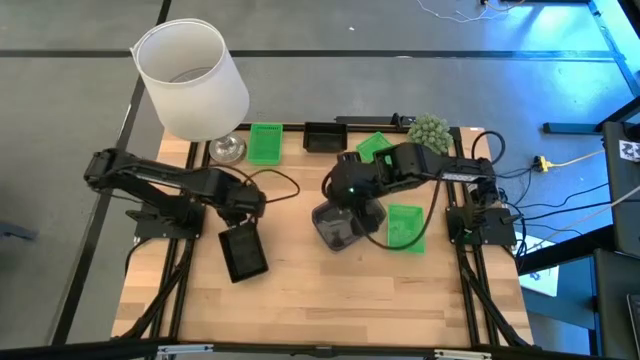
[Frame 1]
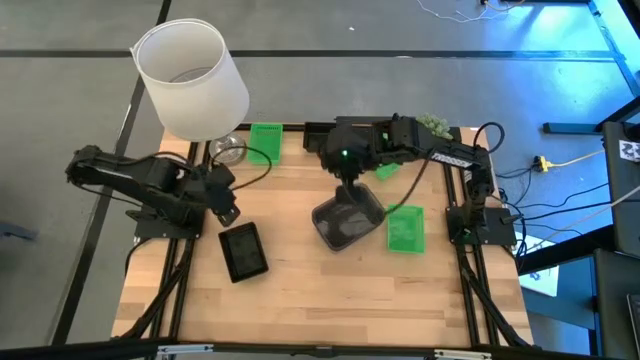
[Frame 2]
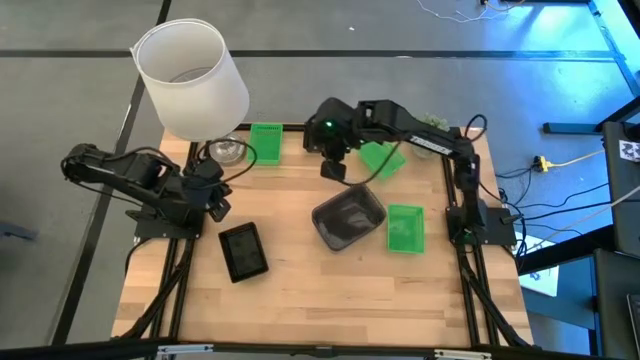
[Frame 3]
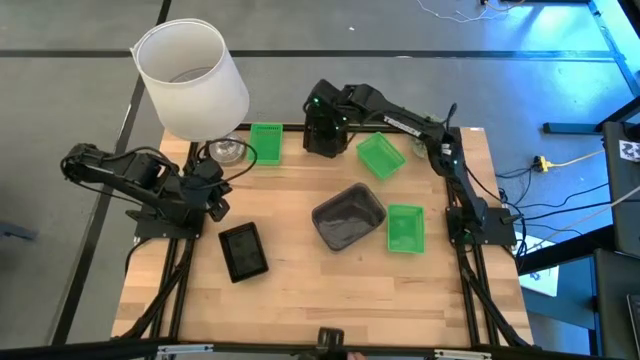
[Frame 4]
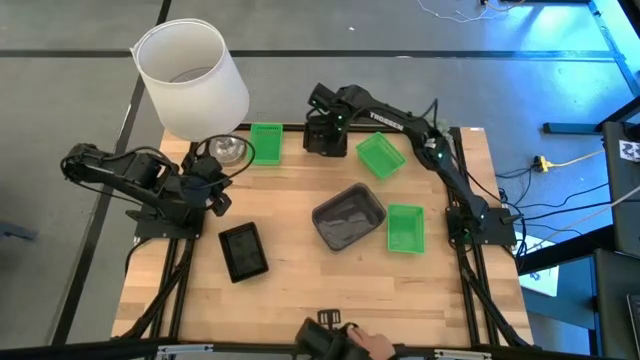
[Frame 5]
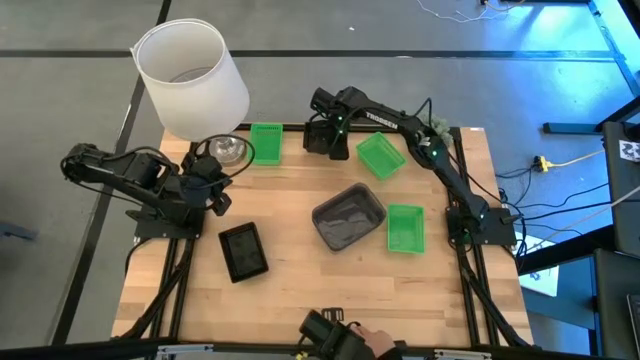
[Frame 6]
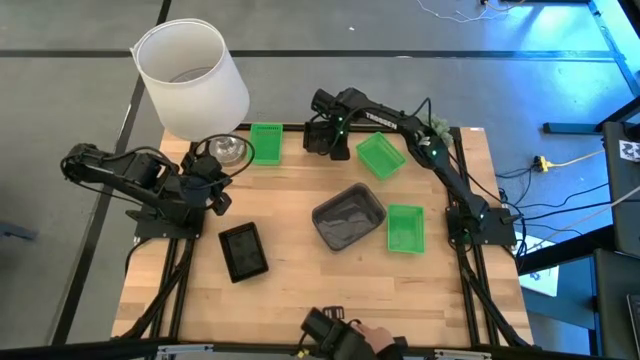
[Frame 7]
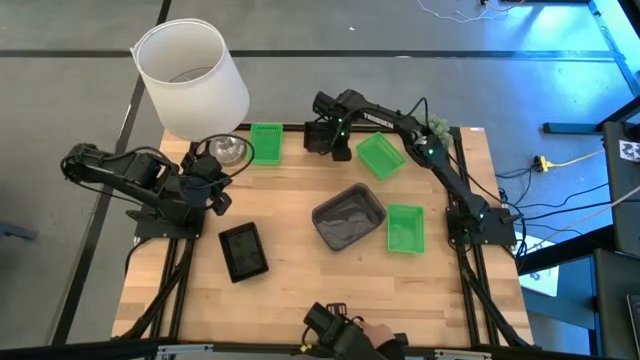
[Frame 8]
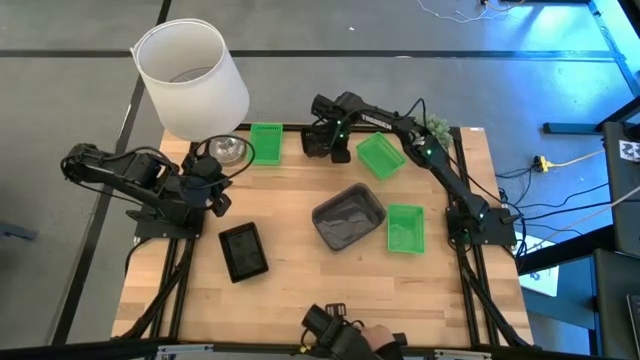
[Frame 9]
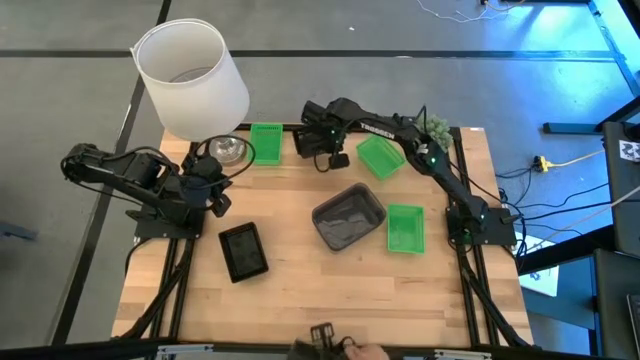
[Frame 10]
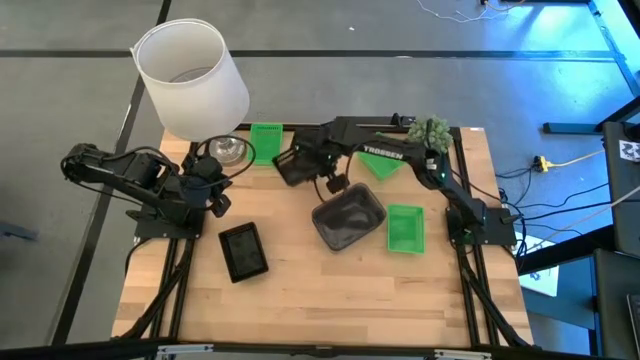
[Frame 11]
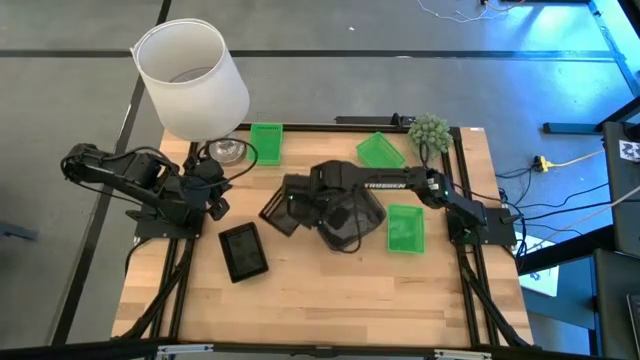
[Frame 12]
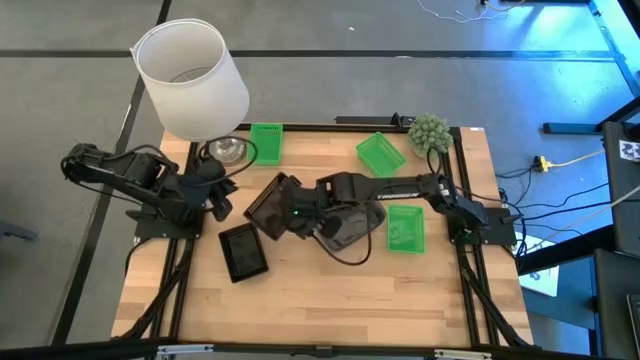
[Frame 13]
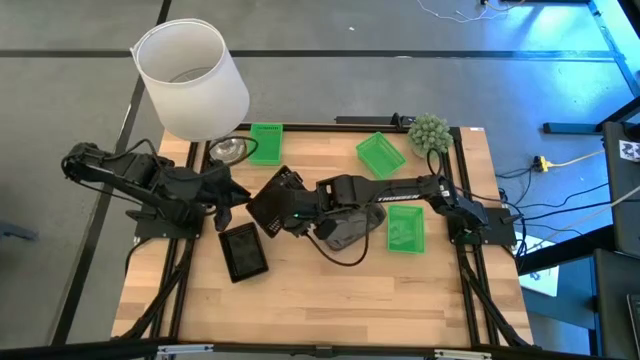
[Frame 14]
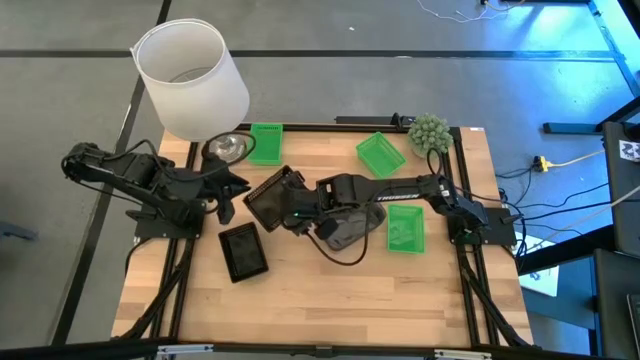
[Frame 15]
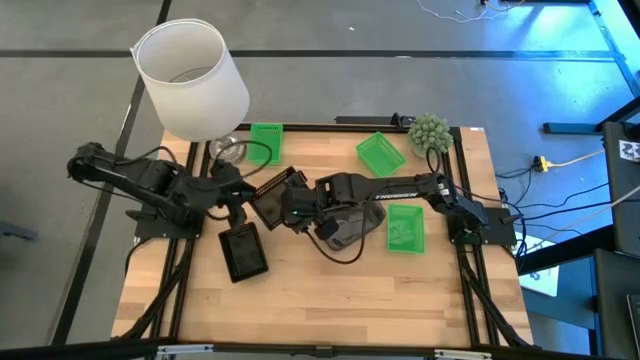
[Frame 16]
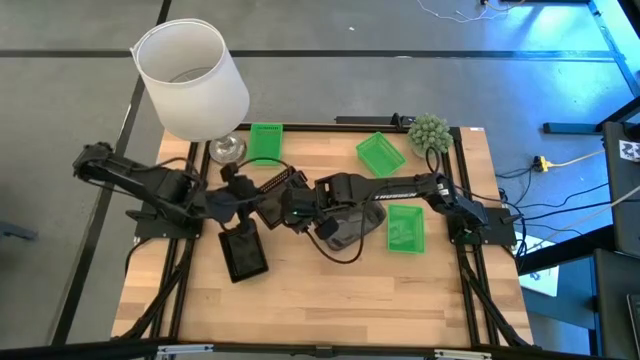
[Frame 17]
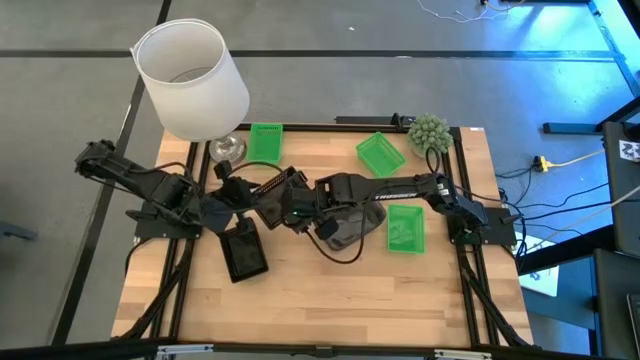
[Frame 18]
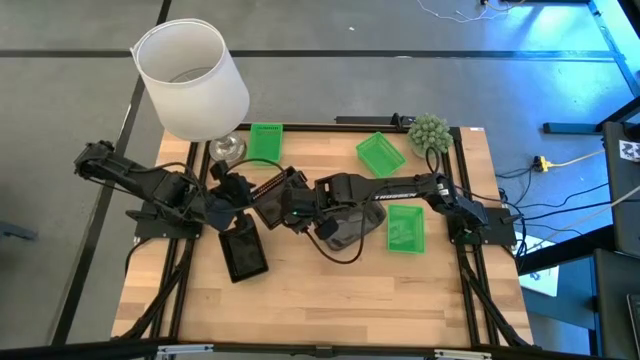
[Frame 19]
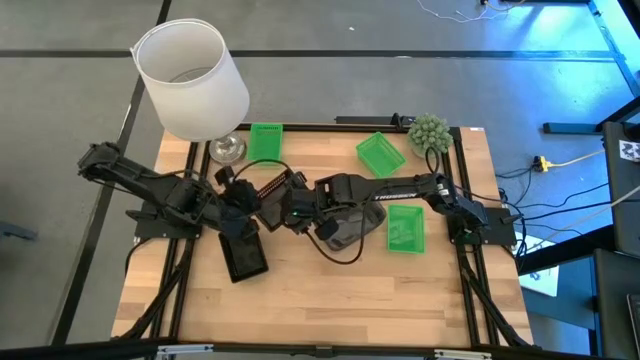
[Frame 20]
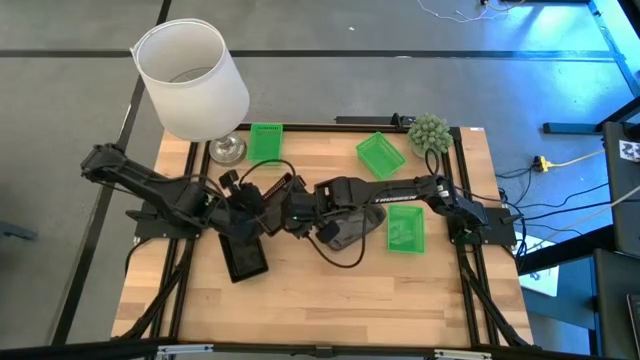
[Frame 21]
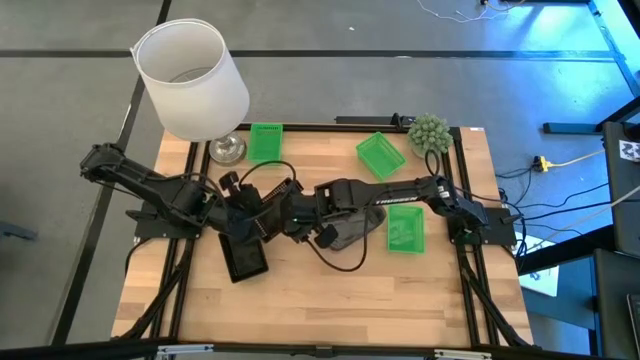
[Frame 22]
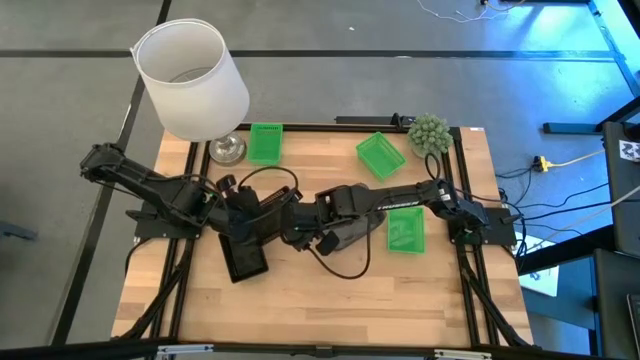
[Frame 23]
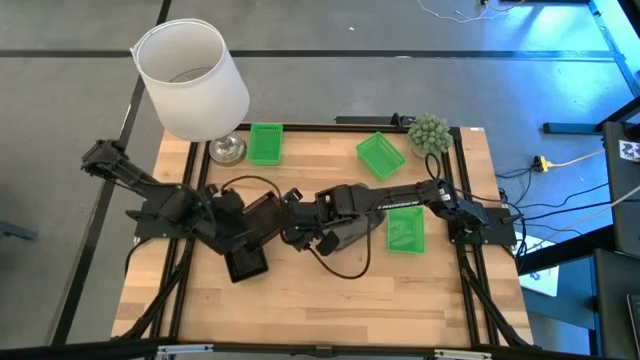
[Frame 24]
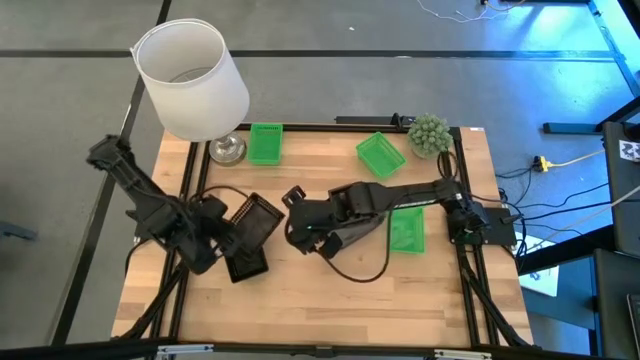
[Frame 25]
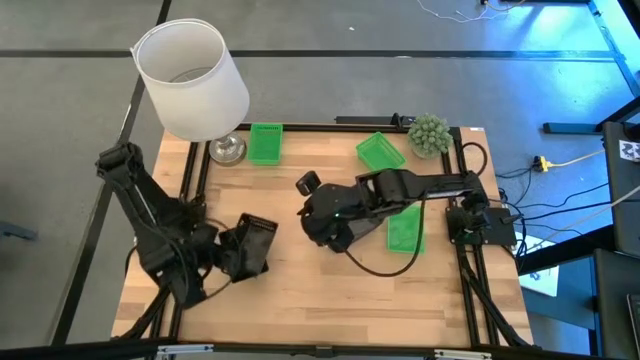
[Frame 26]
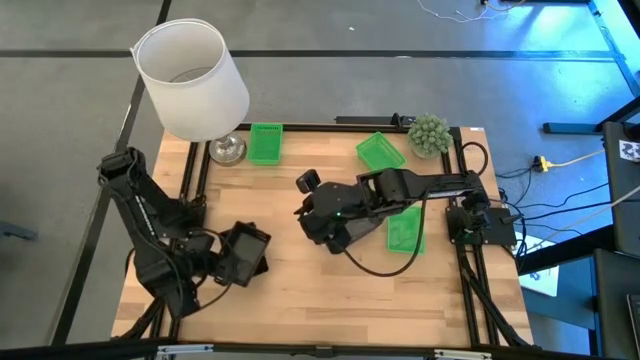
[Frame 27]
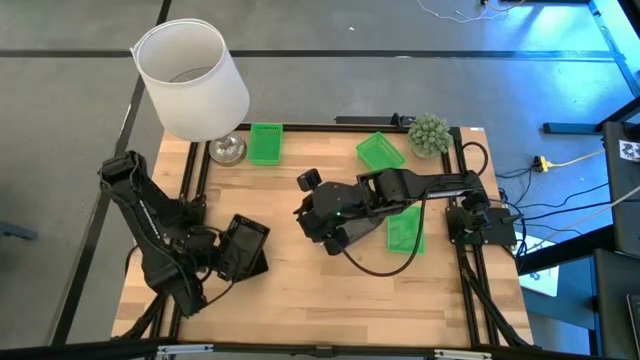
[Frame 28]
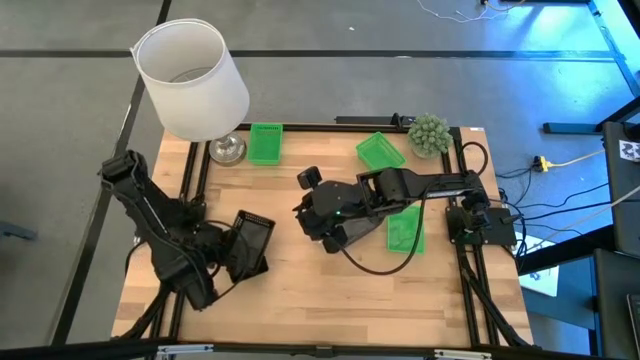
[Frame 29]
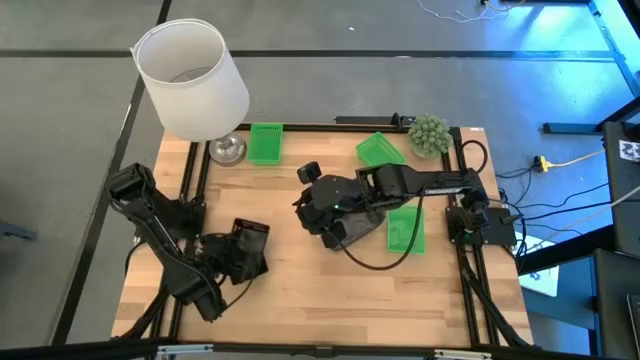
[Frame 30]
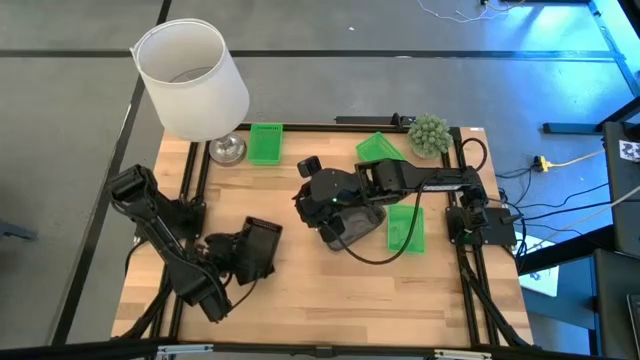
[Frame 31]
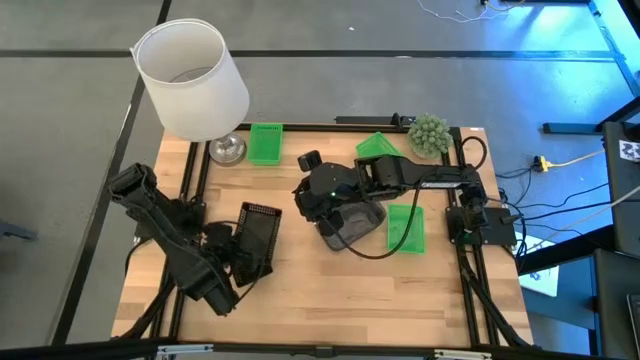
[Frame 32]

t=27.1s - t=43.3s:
Stack the top black bin on top of the bottom black bin

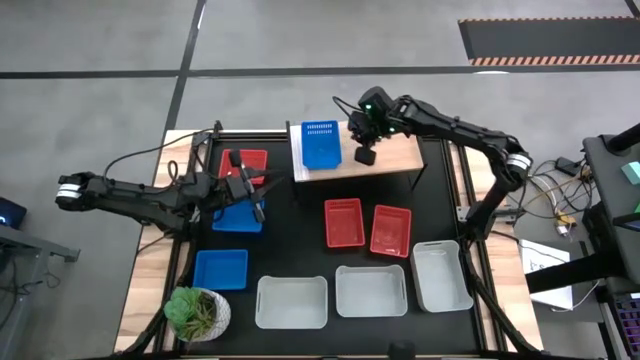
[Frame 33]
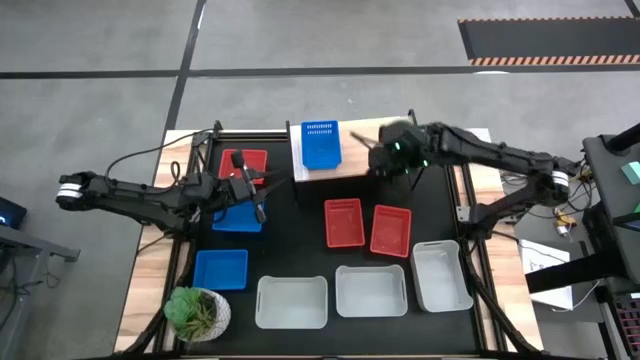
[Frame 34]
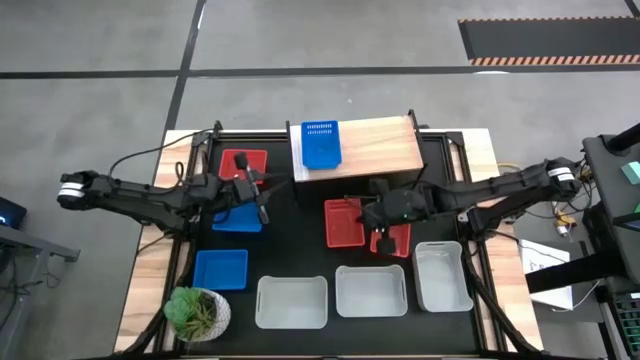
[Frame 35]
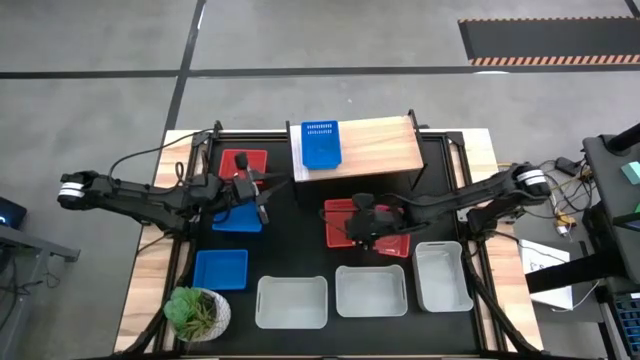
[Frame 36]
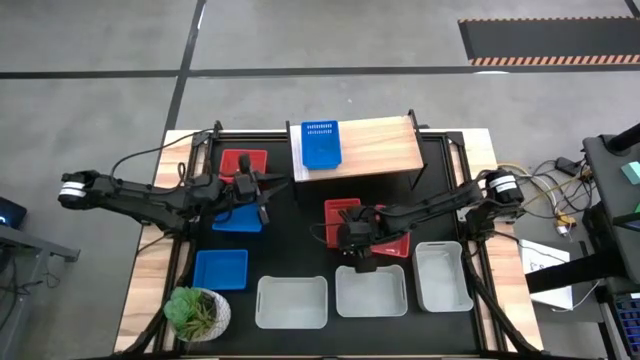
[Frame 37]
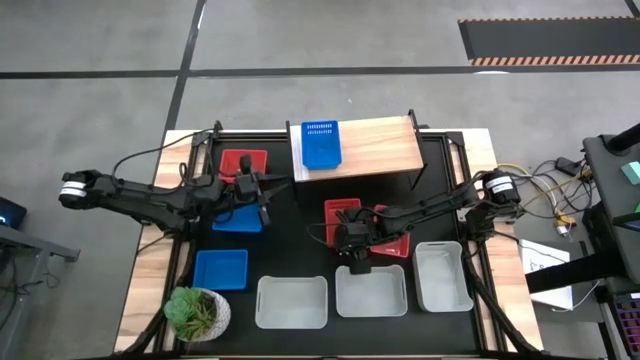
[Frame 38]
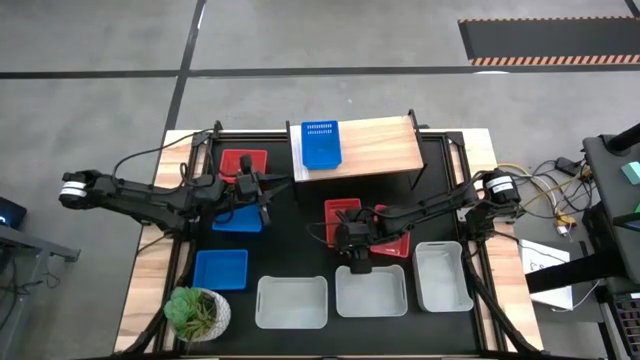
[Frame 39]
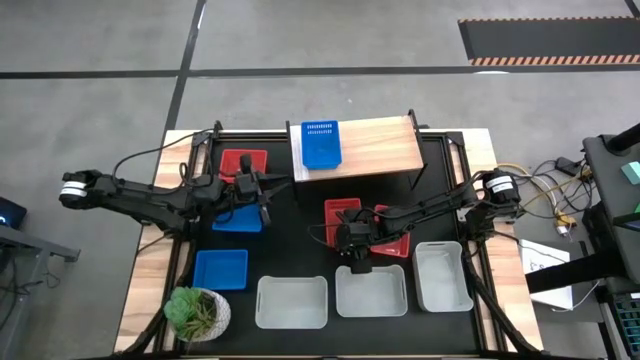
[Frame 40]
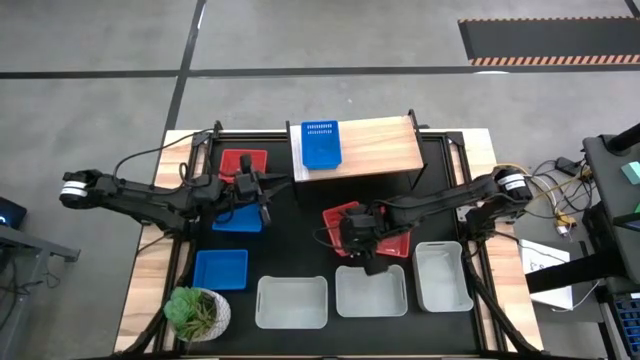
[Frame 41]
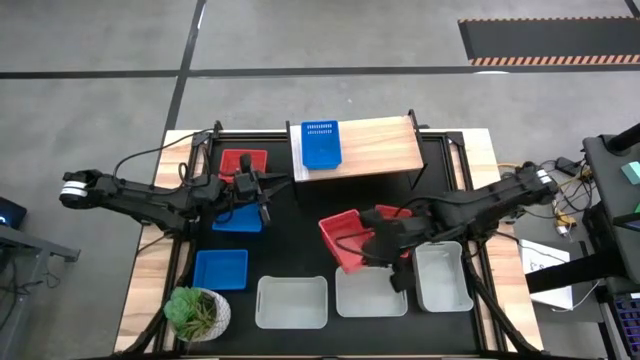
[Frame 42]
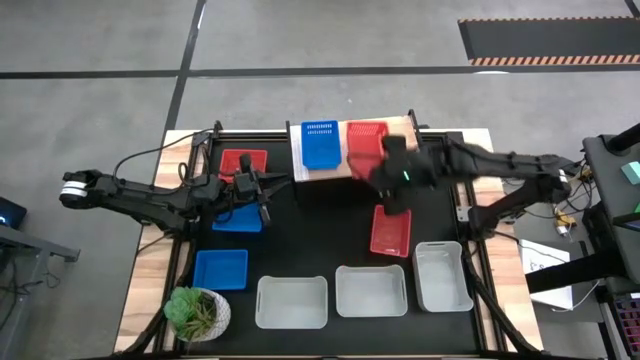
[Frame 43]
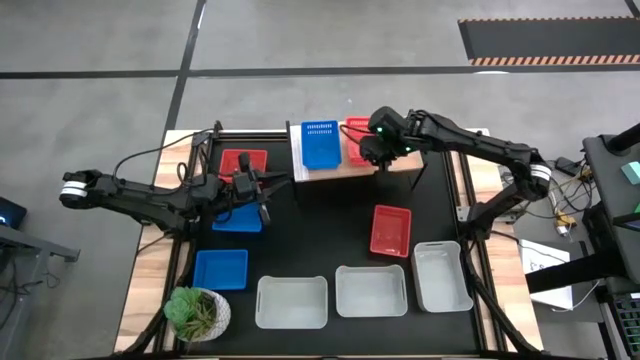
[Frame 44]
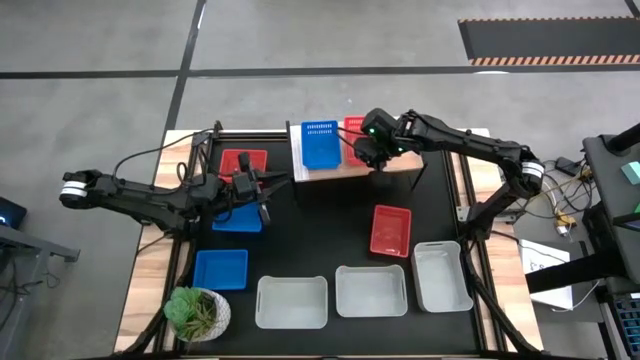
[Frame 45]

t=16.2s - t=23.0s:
Put the bottom left red basket on the shelf
